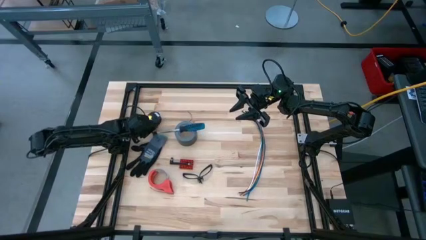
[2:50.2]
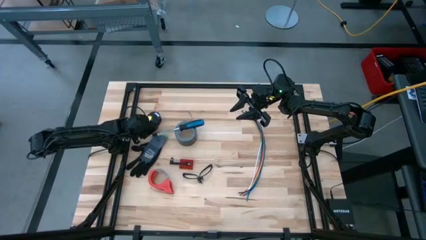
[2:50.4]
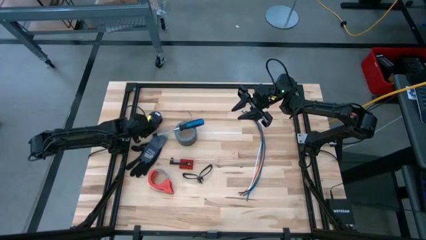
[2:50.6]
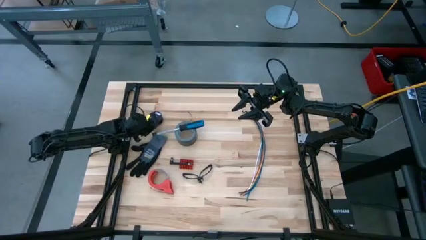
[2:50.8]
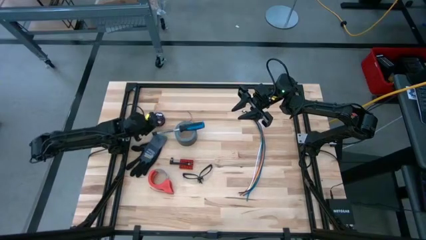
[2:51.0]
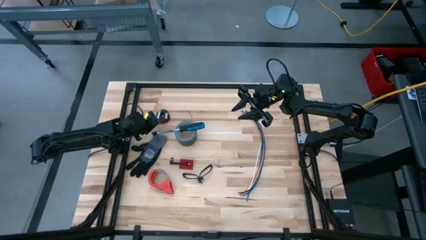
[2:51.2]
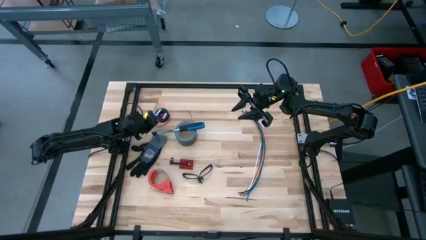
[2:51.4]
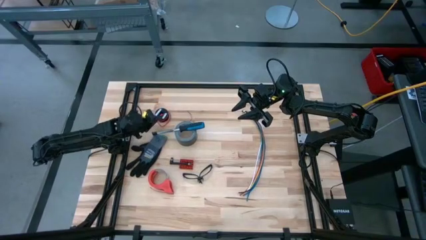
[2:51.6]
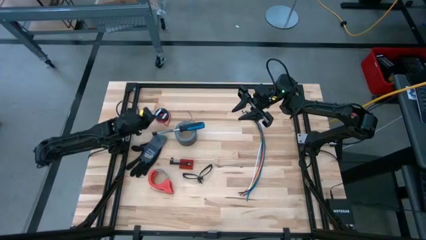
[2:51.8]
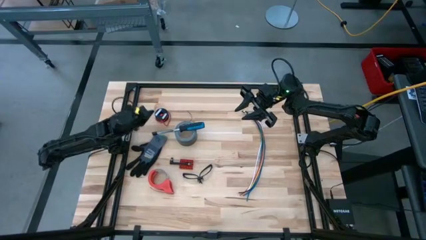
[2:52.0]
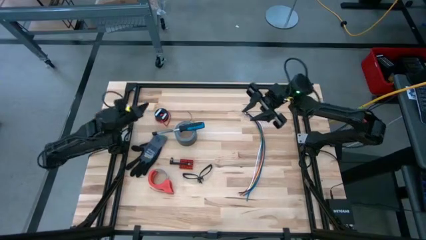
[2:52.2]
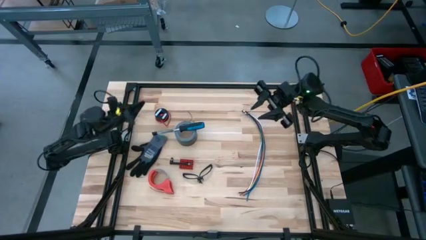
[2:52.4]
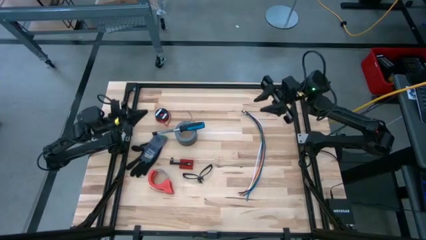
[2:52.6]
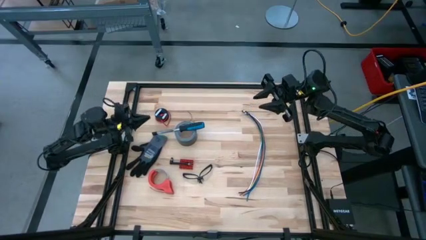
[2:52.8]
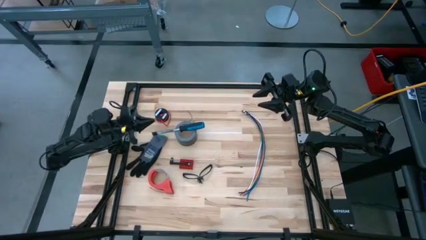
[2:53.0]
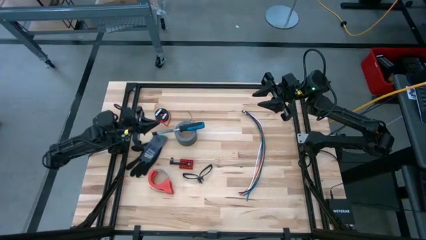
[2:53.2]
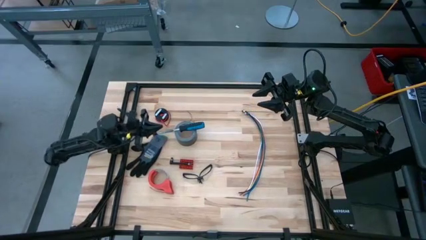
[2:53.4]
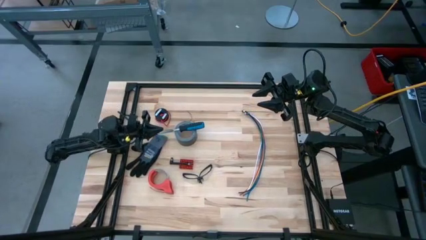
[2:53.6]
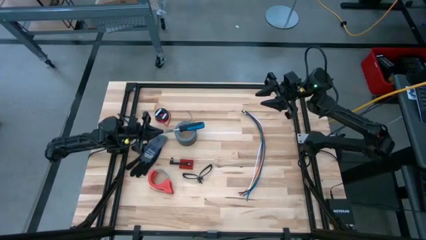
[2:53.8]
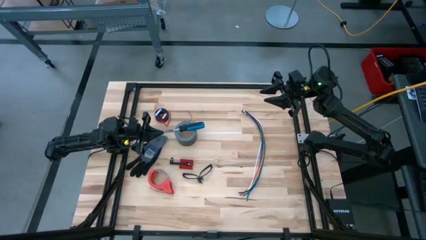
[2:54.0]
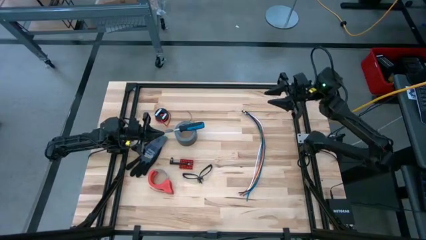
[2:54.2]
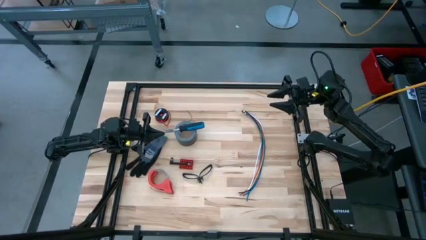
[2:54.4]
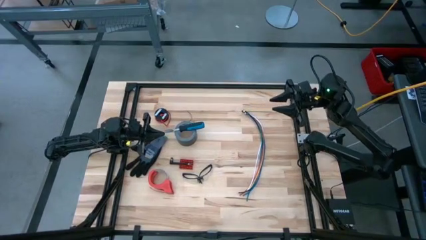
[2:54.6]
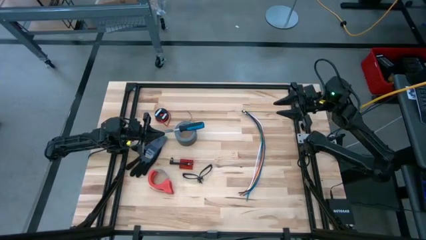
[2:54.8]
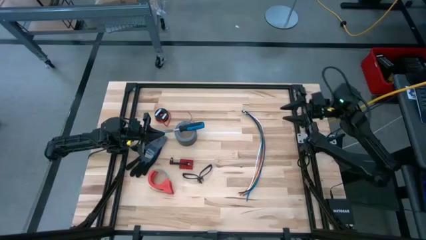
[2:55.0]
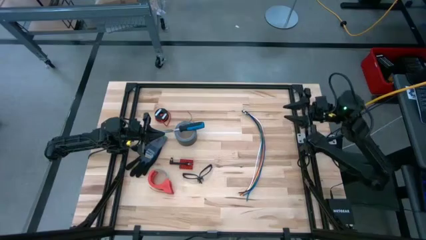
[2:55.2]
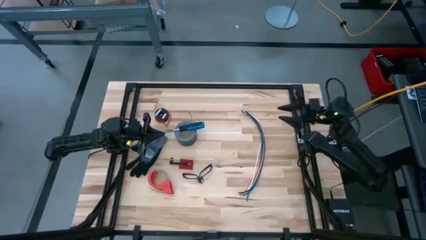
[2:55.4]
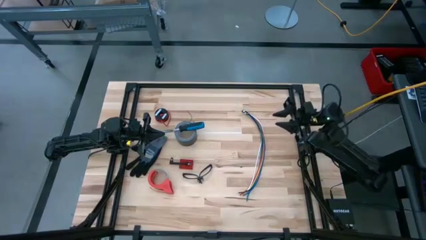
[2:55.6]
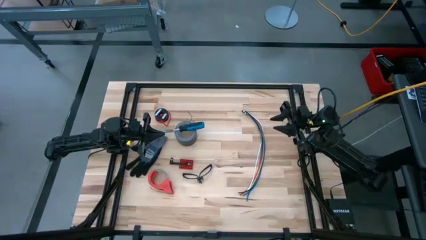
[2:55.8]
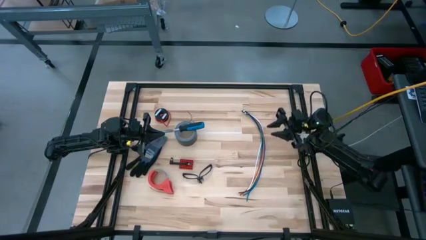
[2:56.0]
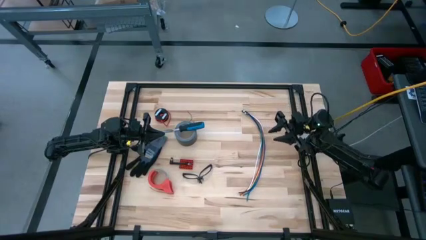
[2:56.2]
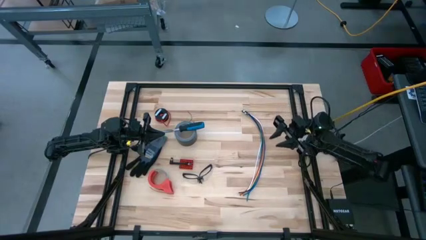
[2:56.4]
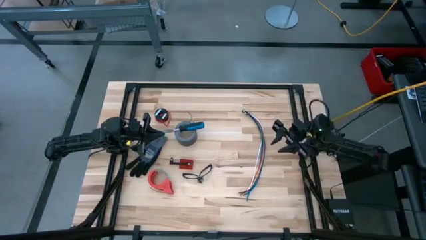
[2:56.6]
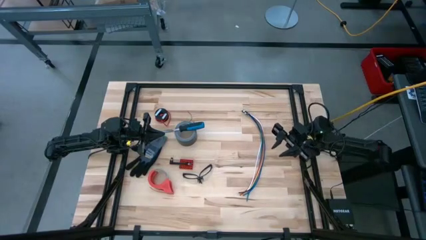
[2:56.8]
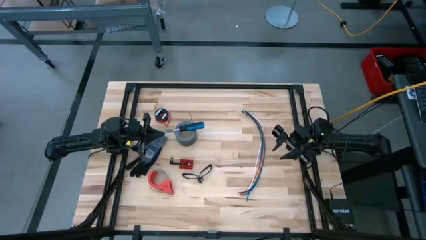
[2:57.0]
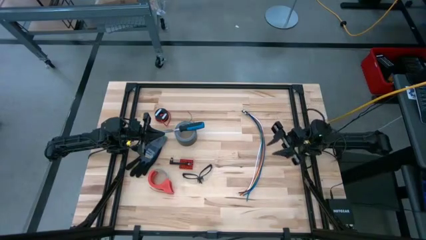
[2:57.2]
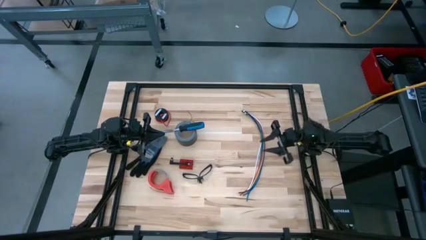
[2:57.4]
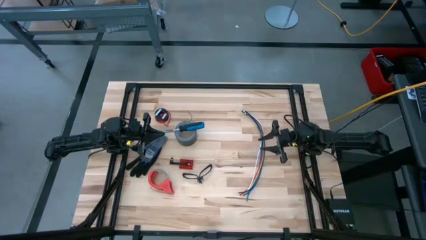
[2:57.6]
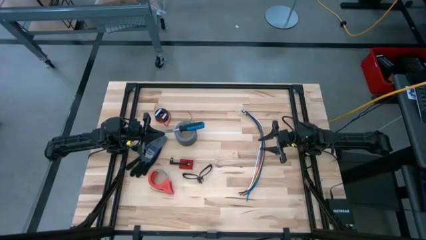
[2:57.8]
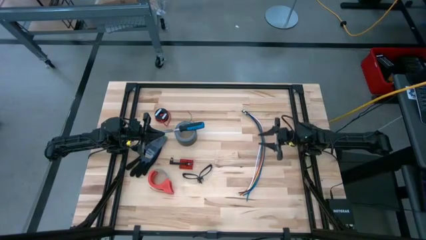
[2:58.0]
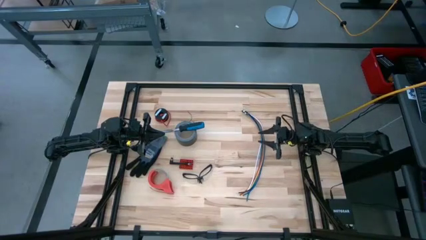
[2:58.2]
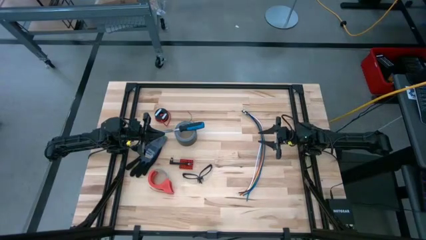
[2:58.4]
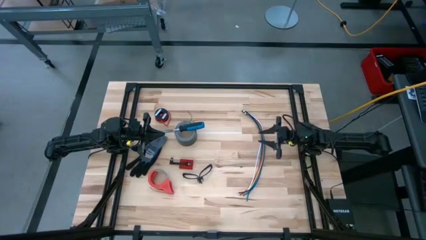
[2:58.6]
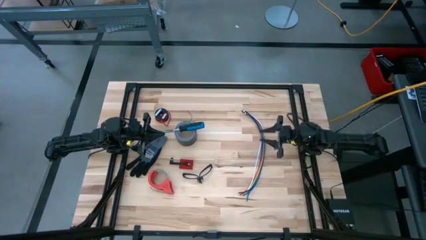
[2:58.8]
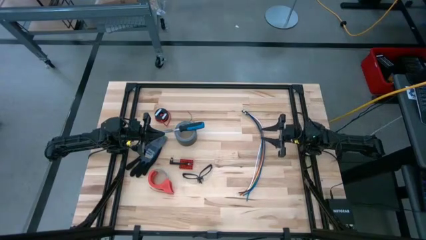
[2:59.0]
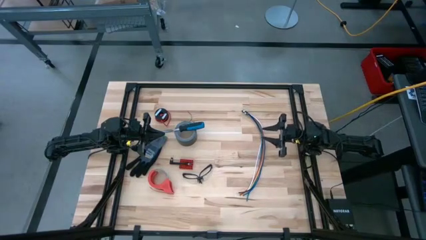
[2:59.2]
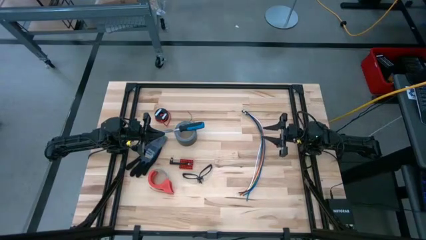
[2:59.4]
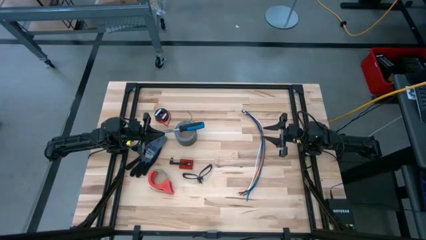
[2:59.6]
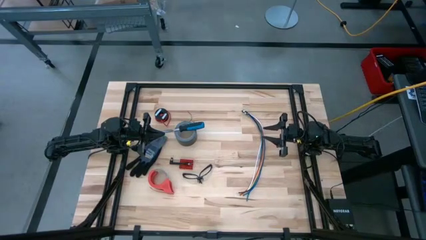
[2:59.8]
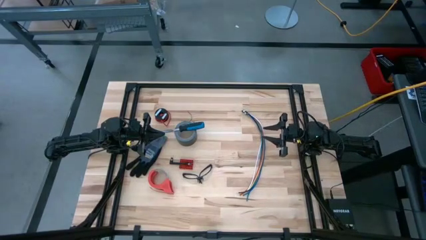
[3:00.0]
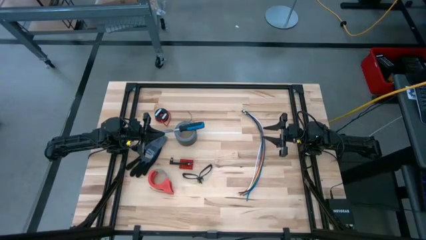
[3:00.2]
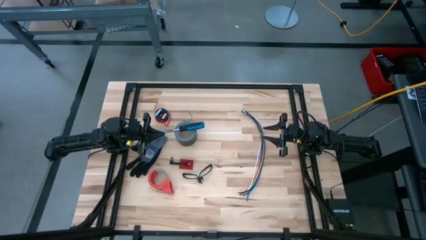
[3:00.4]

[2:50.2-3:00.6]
Task: Coil cords
Return to Home Position

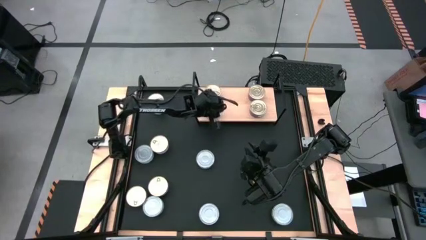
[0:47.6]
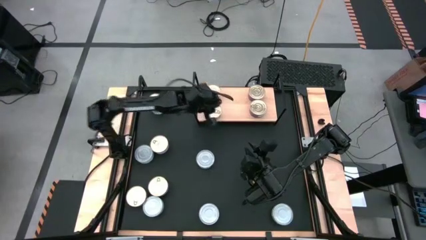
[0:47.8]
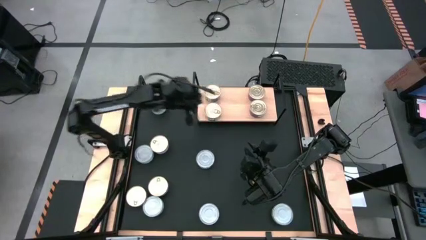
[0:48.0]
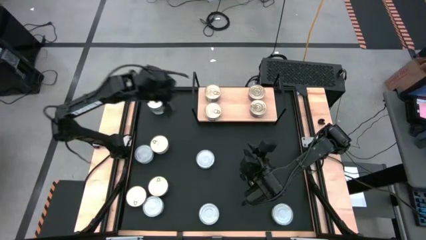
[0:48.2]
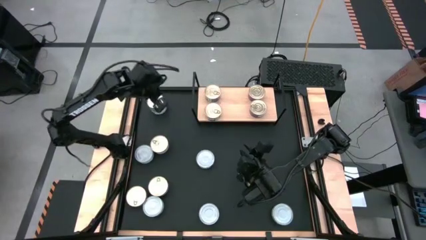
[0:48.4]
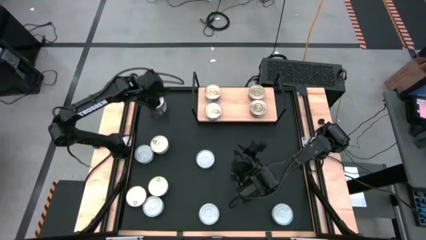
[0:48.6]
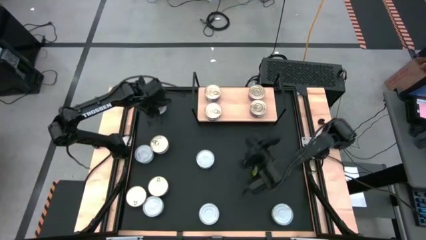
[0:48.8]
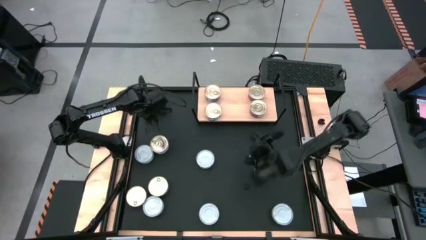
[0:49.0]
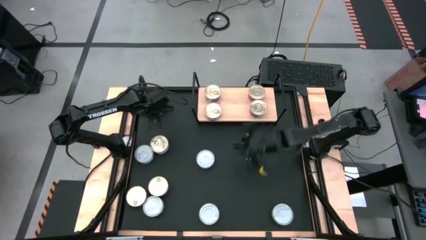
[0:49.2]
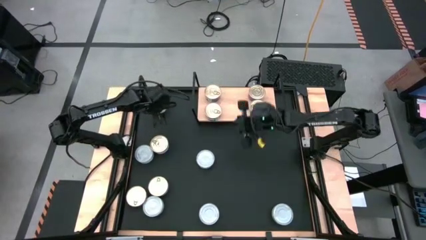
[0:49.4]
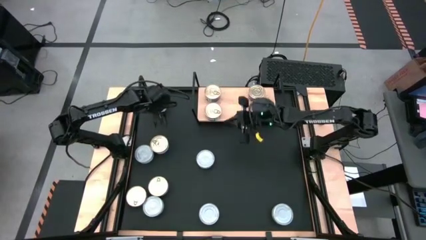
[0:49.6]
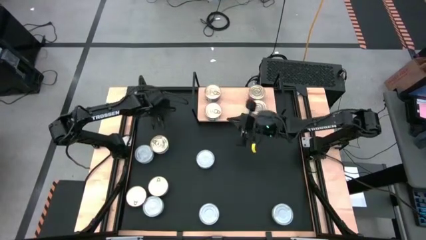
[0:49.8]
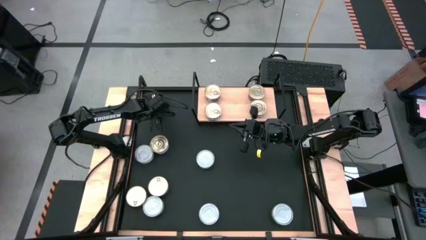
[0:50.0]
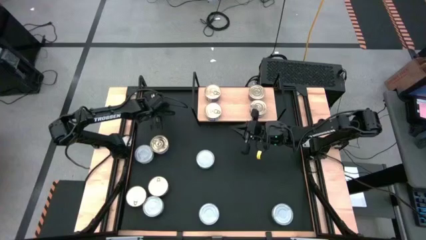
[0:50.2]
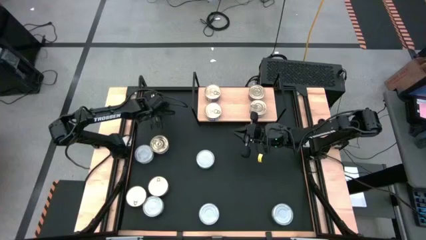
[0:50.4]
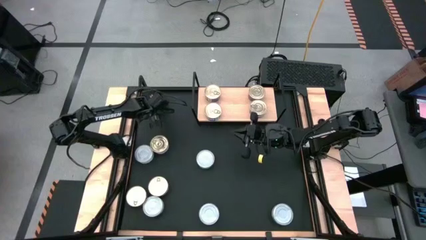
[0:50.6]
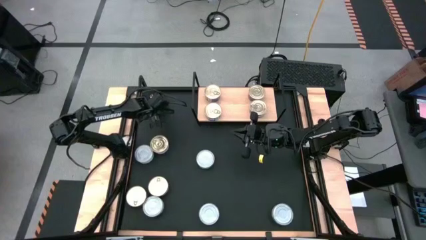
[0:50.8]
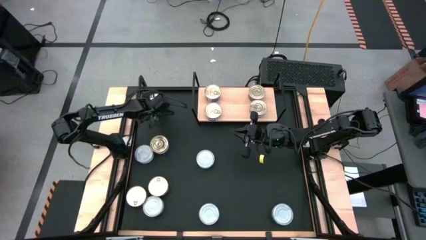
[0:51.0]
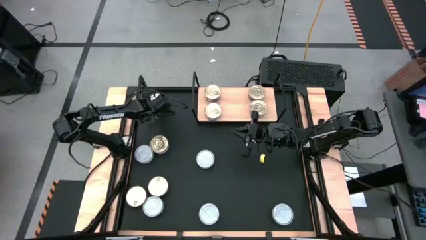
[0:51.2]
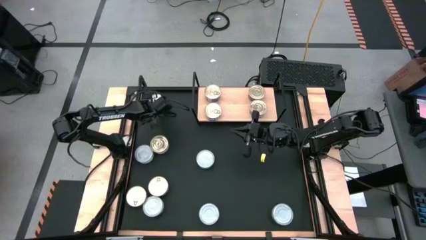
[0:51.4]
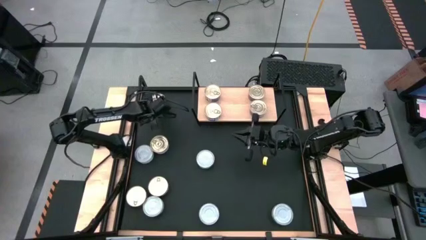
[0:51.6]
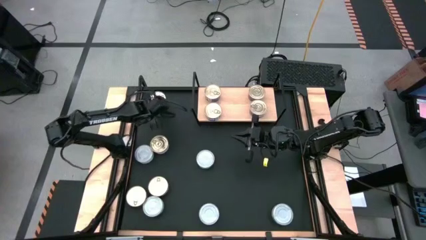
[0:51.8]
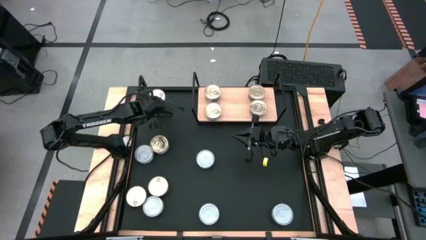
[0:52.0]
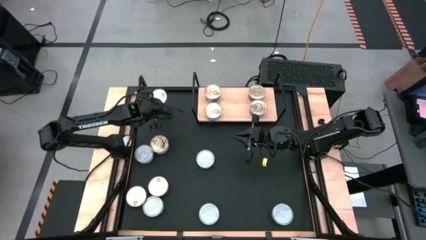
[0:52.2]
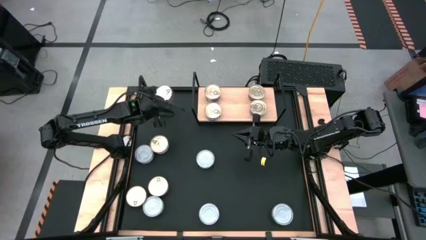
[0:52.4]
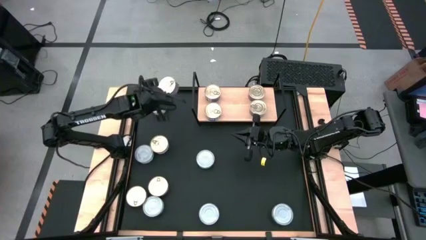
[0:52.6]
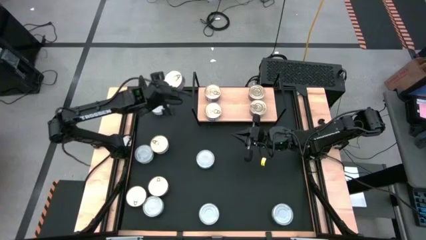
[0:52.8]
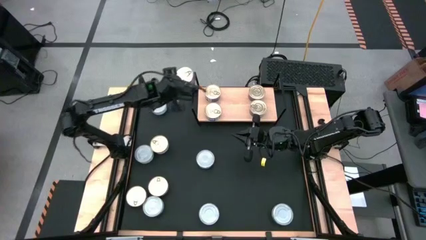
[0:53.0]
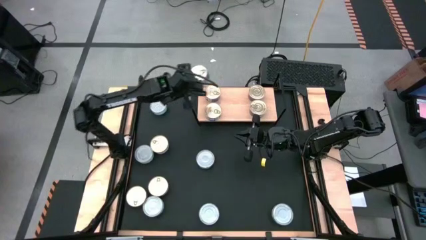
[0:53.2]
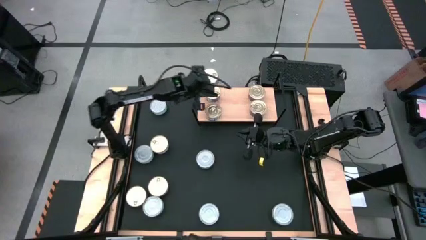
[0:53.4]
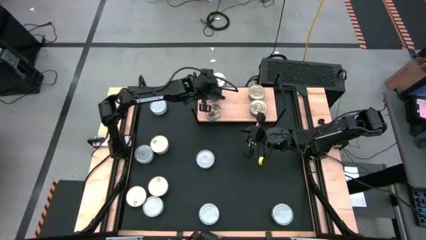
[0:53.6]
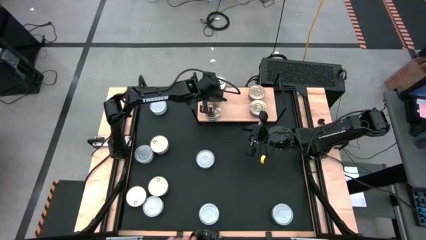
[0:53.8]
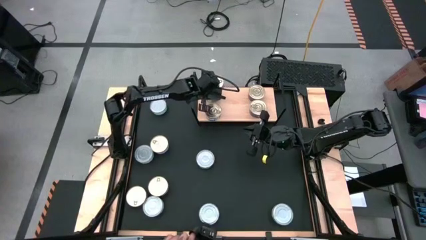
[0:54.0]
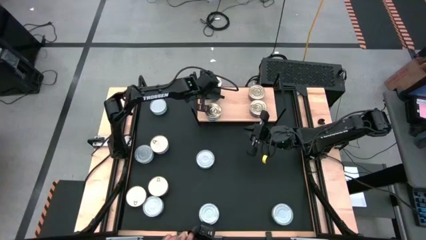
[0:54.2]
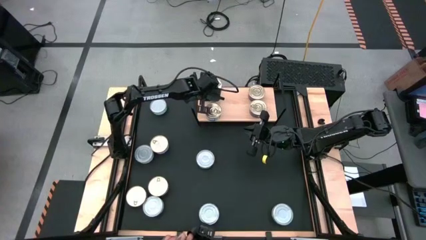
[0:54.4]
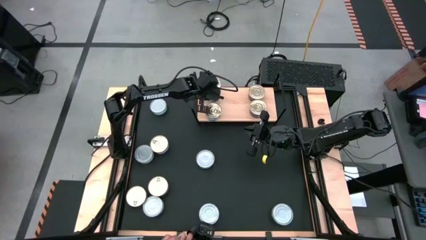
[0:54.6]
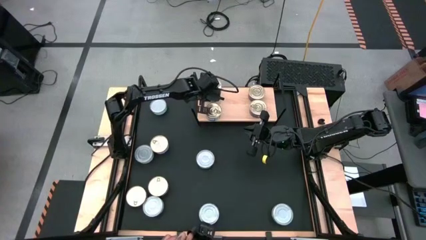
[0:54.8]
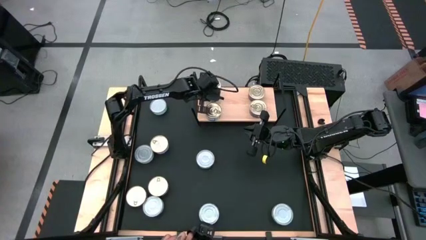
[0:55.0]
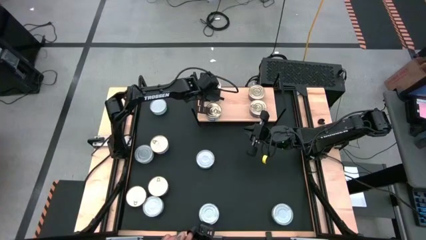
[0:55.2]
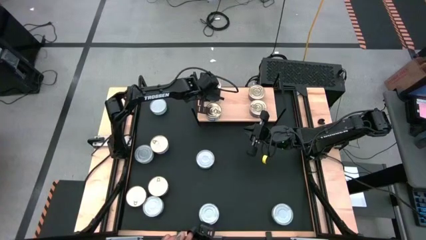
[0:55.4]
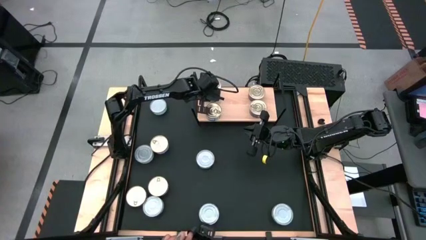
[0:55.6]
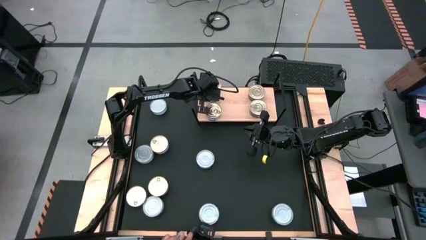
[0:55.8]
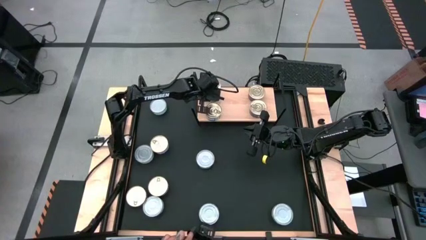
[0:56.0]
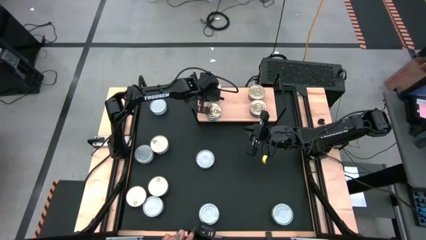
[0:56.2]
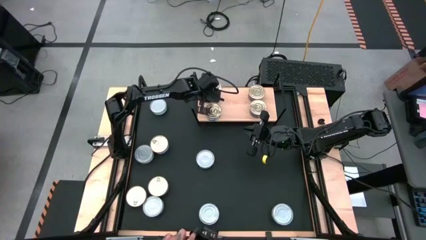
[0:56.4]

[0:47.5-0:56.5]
Task: Stack canned seafood by type on shelf
Stack the blue pink tuna can on top of the other blue pink tuna can on the shelf
